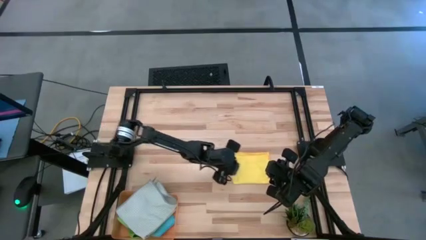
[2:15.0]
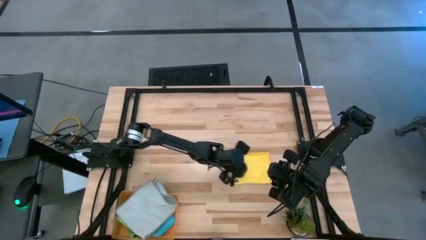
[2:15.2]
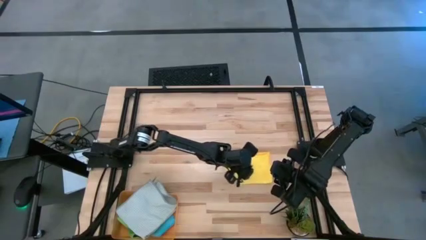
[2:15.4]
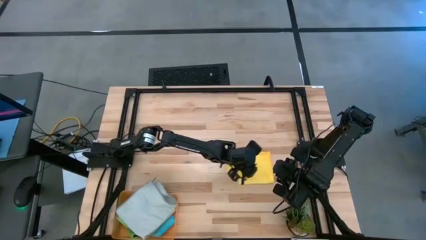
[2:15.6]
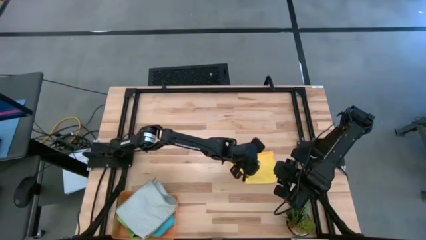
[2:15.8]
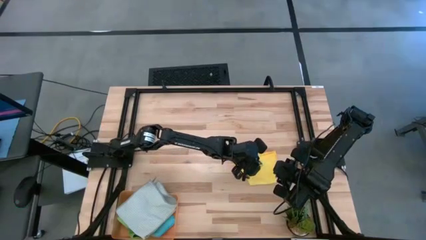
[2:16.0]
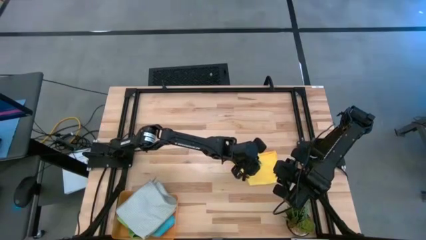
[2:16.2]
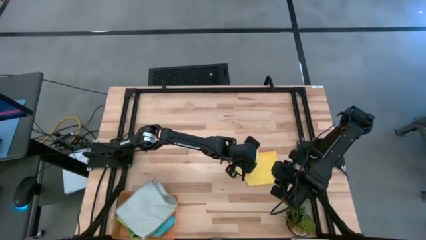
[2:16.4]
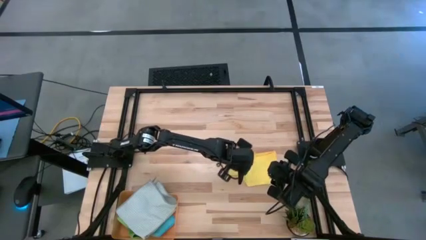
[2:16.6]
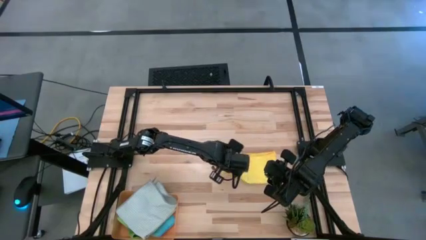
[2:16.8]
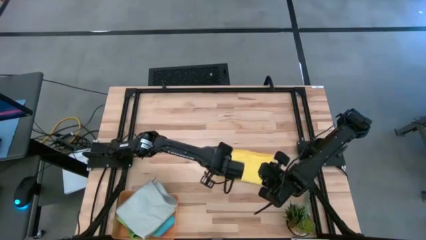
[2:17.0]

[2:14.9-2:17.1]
Task: Fold microfiber towels
Fold the yellow microfiber towel

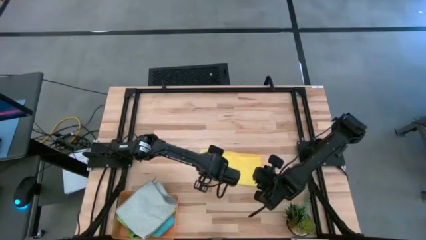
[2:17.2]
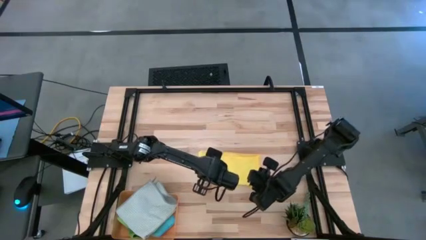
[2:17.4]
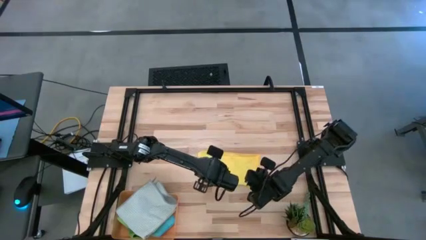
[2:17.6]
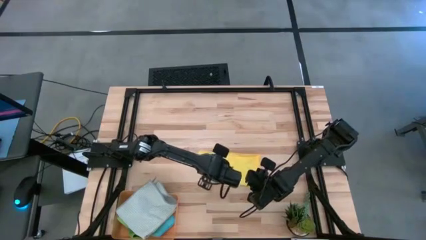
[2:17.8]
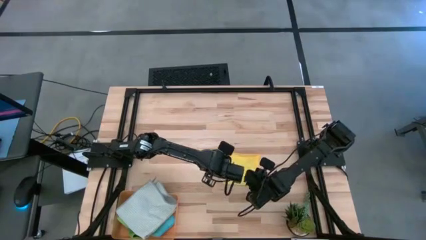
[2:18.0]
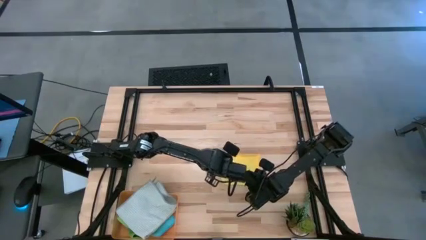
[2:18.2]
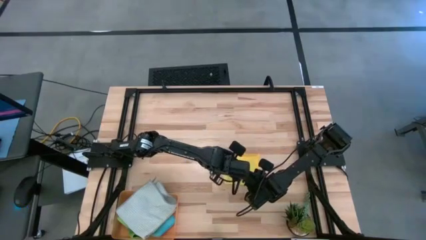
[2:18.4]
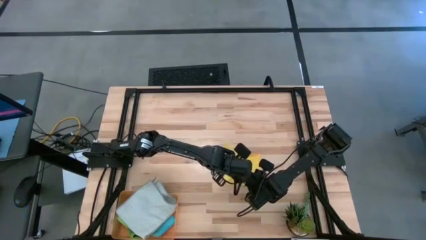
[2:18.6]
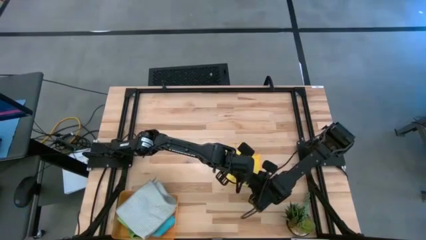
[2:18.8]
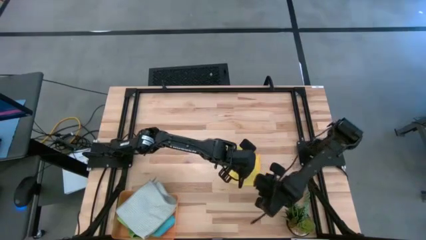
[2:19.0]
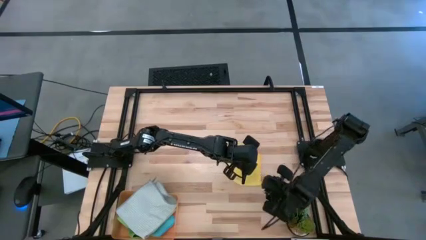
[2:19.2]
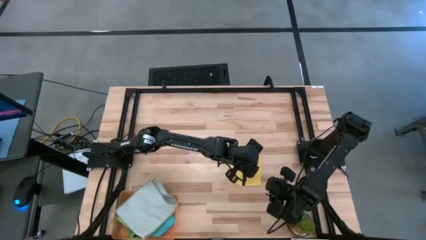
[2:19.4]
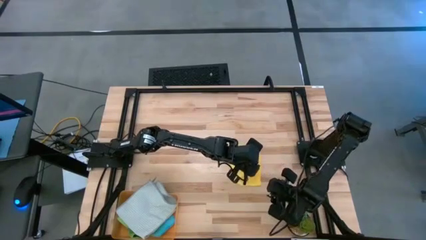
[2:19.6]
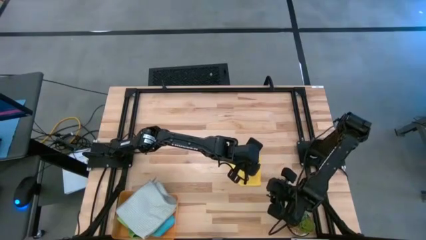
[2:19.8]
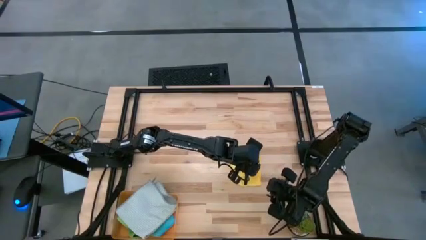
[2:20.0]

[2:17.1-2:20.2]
Fold the yellow microfiber cloth

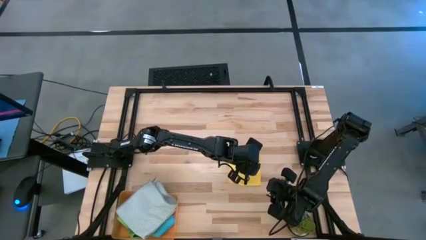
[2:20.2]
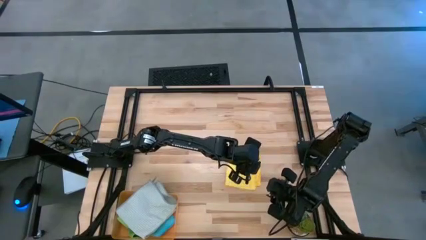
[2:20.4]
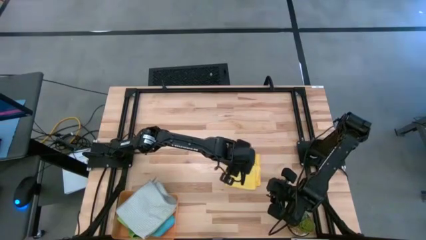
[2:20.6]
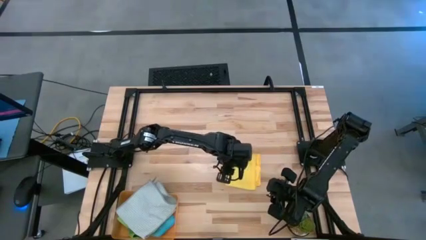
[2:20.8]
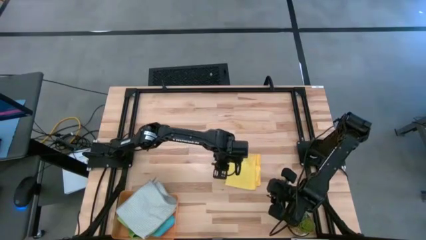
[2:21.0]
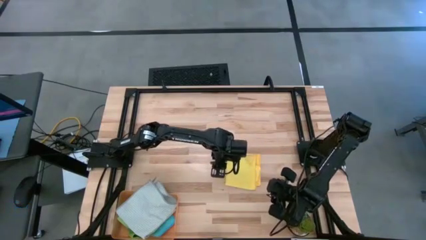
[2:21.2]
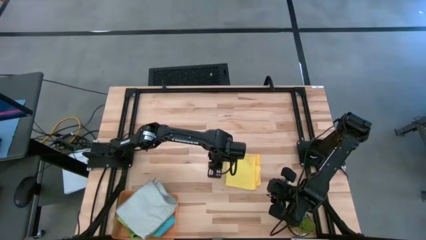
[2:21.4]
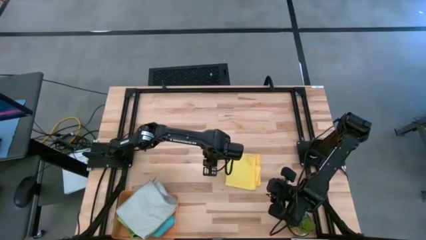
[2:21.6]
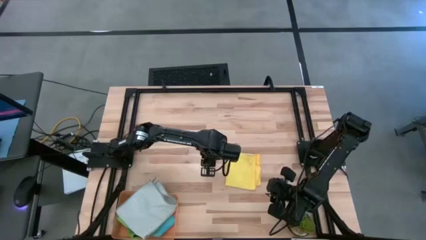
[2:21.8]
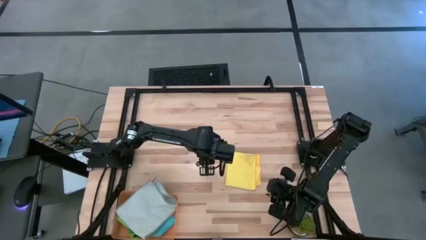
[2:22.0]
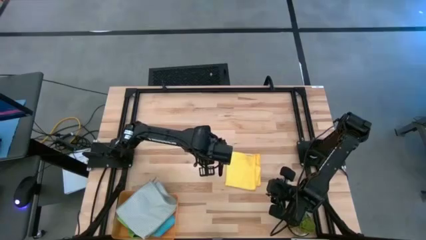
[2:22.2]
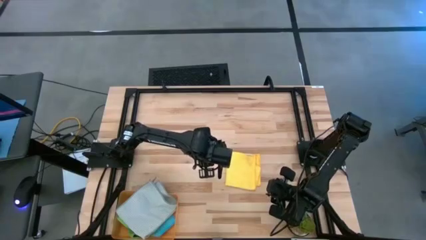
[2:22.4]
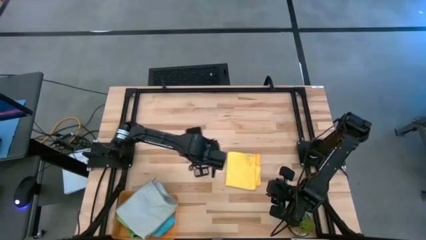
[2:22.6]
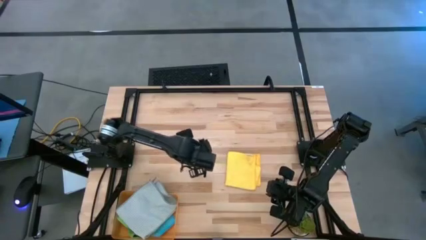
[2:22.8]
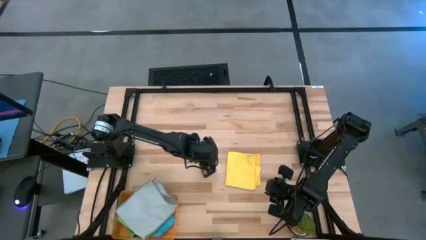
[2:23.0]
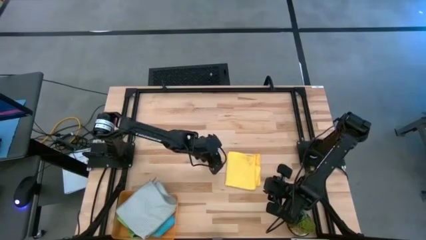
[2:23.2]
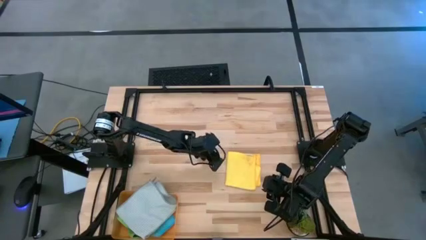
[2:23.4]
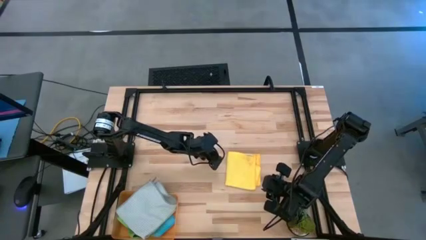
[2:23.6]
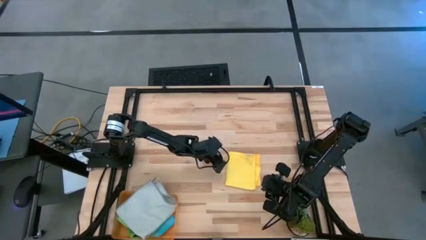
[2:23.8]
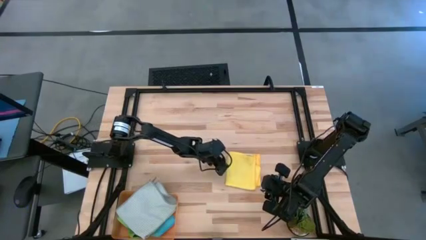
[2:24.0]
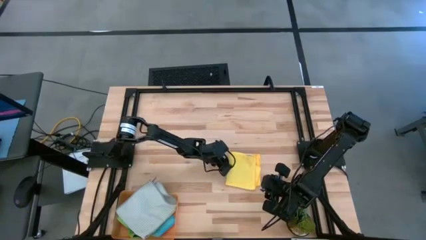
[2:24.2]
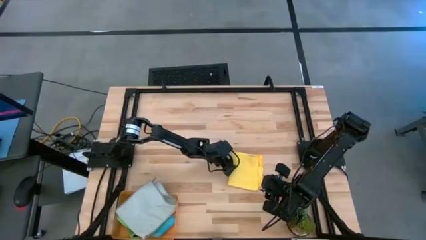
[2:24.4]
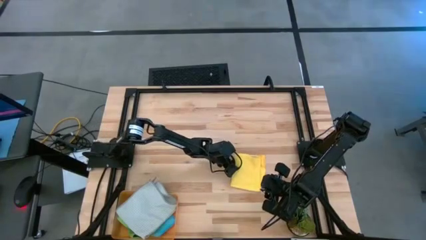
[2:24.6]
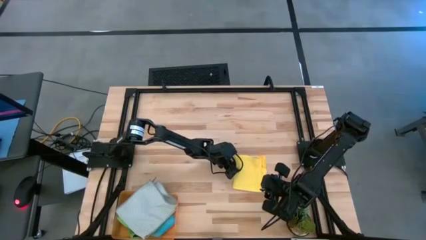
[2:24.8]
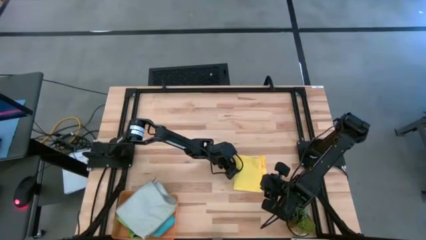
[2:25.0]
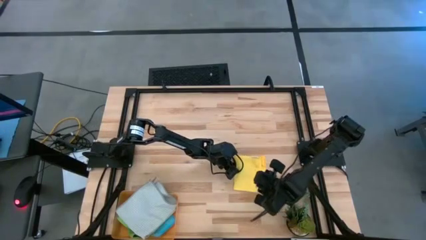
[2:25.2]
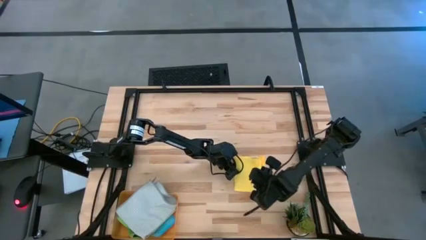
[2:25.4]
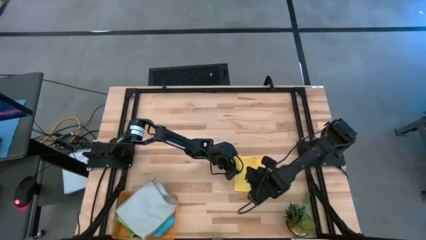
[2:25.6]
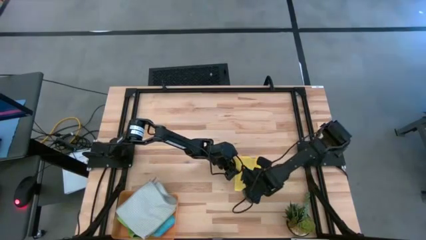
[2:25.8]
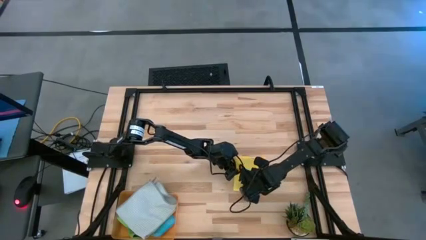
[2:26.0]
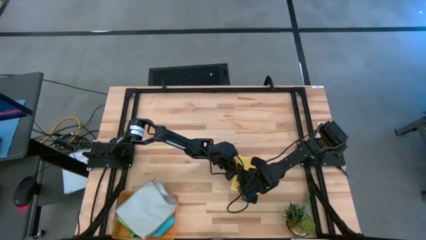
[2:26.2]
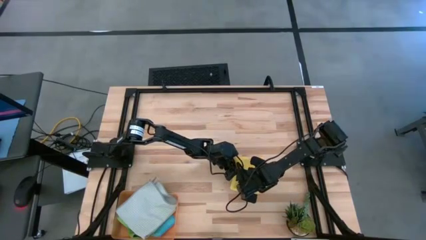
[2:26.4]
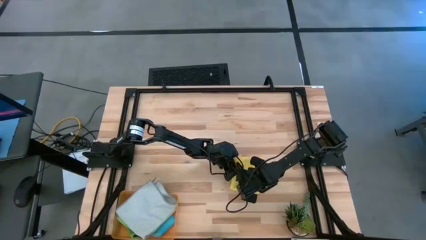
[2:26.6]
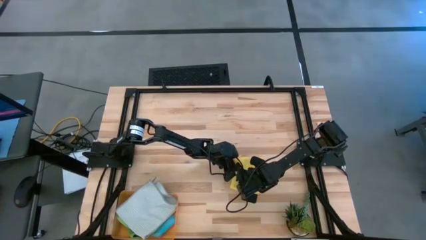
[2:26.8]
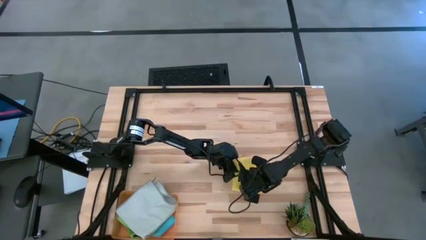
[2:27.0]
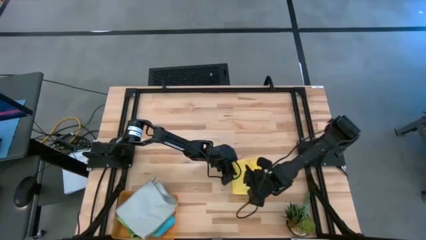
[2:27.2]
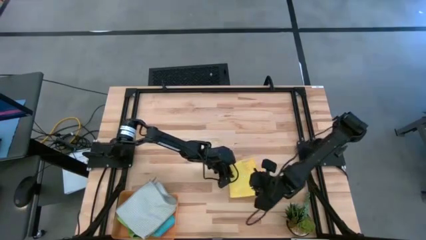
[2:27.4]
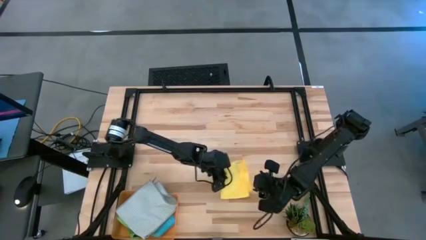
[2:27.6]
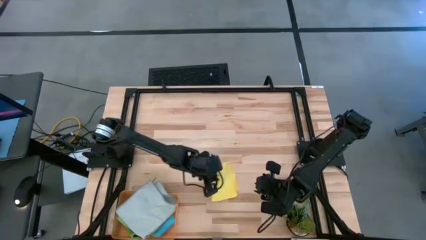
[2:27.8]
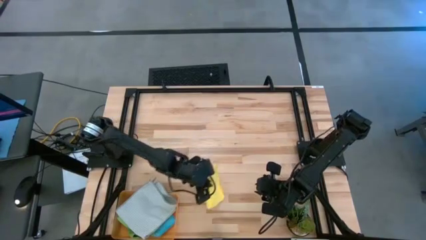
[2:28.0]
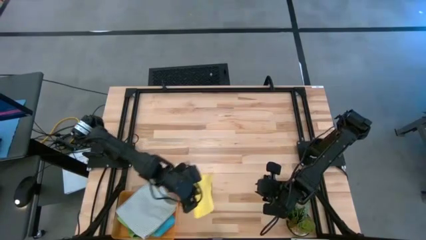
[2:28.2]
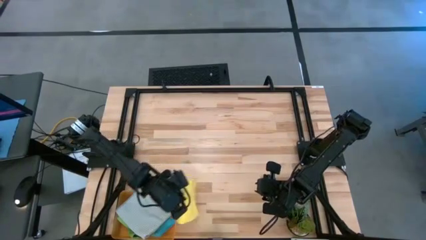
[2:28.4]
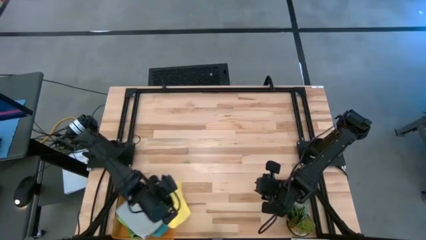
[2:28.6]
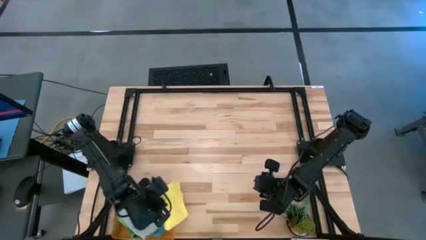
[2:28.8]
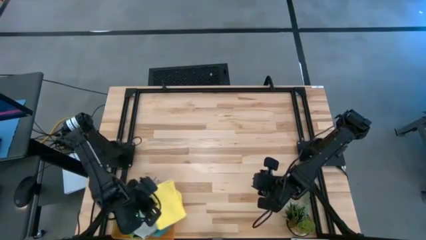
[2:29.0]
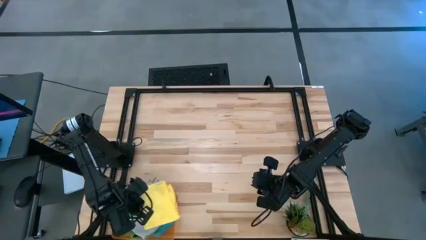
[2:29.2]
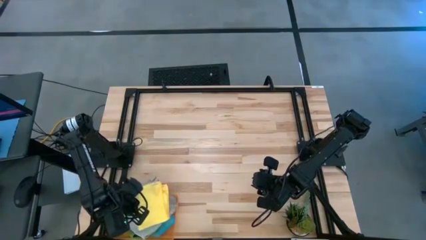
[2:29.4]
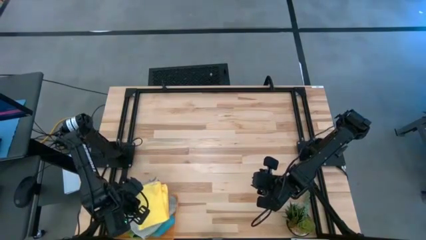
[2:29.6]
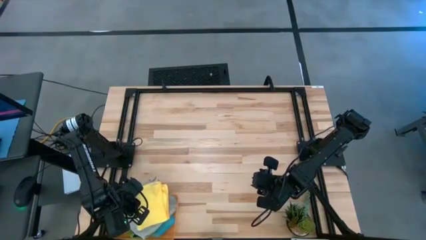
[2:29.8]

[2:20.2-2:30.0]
Put the yellow microfiber towel into the orange bin

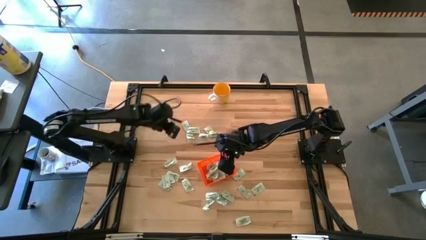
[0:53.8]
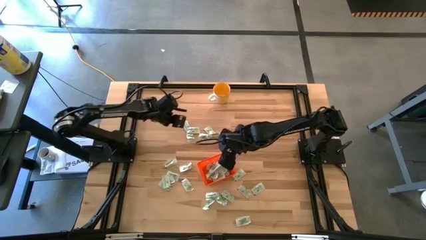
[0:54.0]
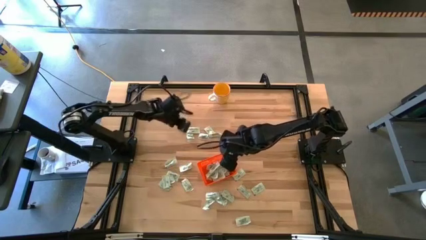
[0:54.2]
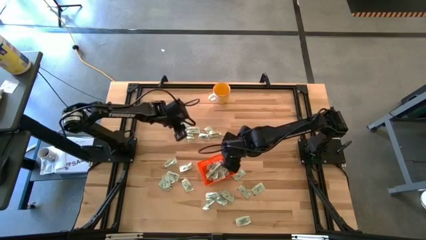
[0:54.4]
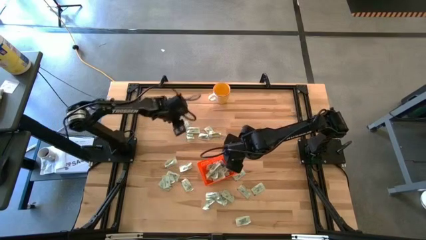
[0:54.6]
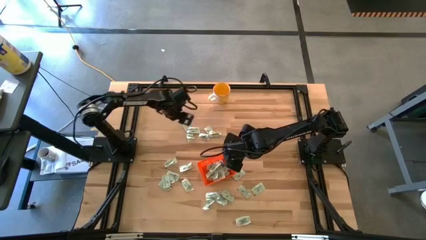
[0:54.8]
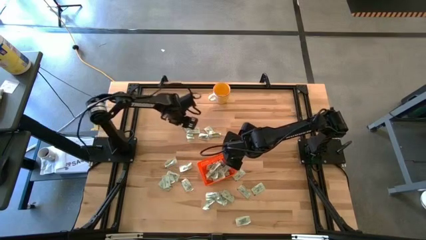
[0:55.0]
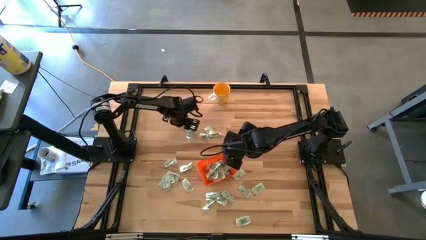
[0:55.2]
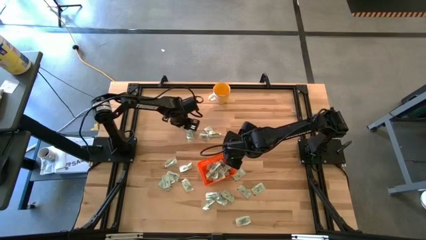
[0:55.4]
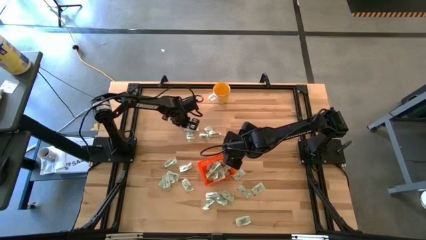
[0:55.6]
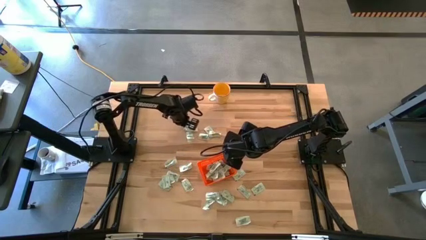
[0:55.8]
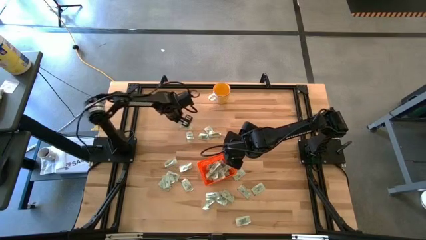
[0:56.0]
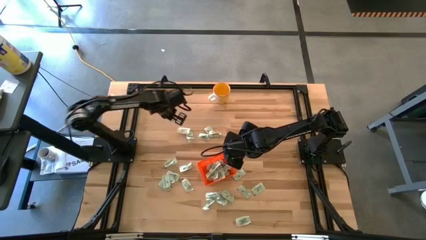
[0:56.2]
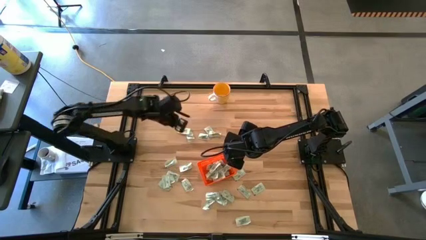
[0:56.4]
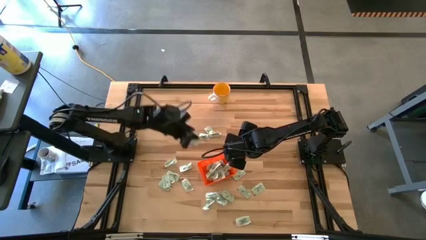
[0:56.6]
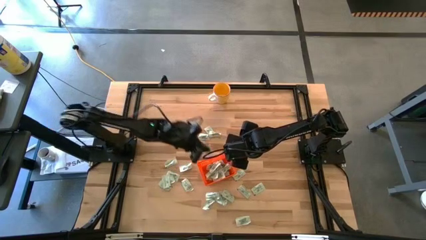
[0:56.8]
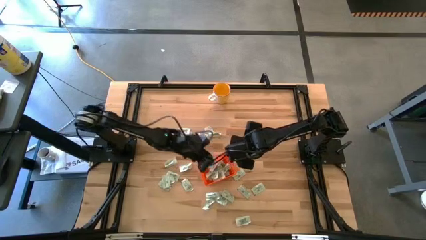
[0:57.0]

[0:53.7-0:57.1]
Task: Pick and place Stevia / Truvia into bins
Put the stevia packet into the bin
